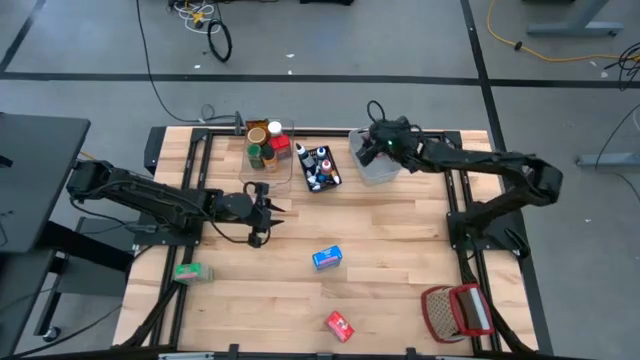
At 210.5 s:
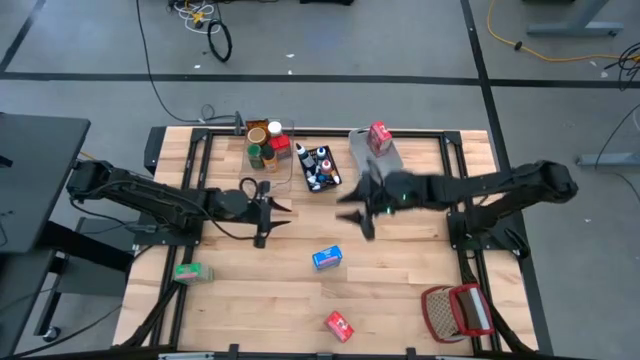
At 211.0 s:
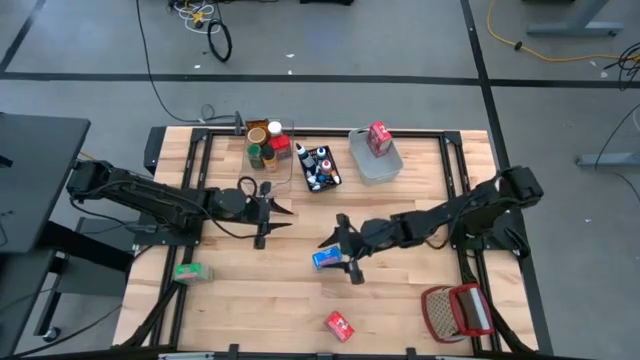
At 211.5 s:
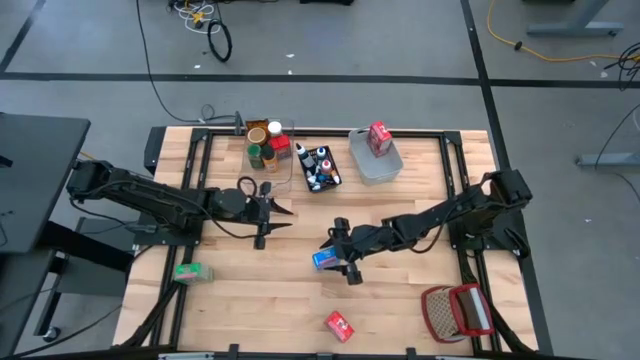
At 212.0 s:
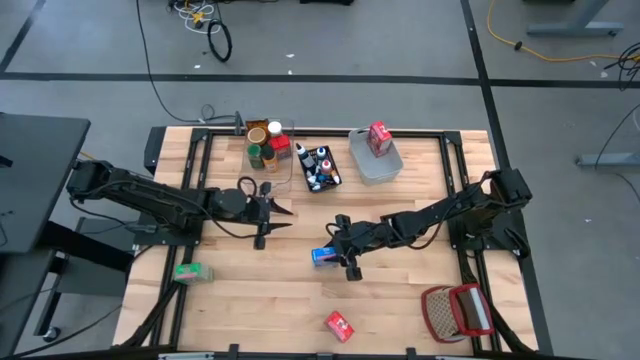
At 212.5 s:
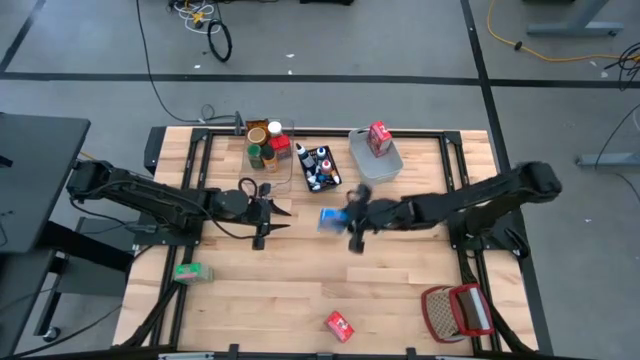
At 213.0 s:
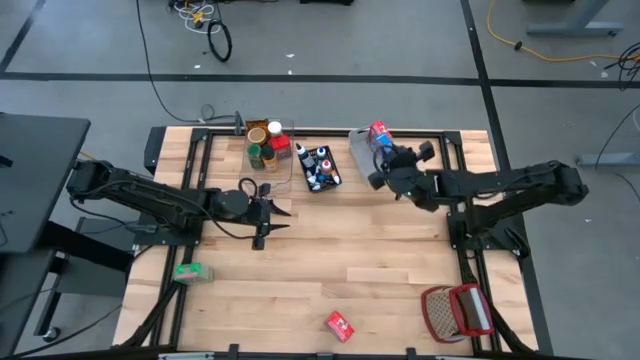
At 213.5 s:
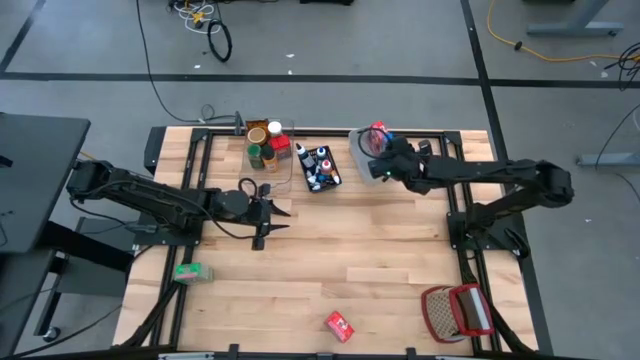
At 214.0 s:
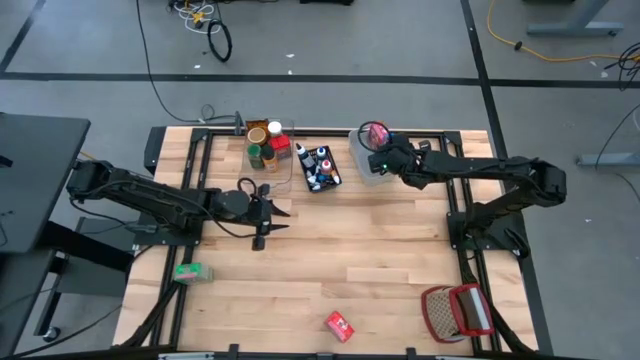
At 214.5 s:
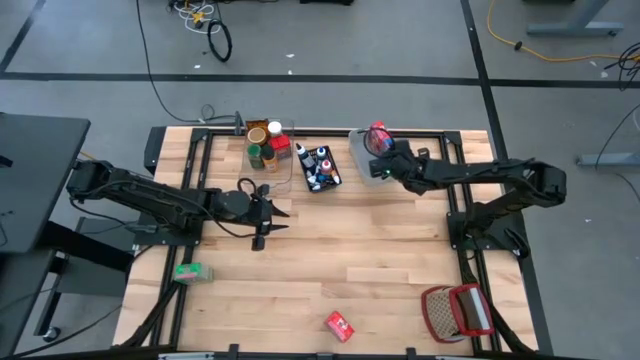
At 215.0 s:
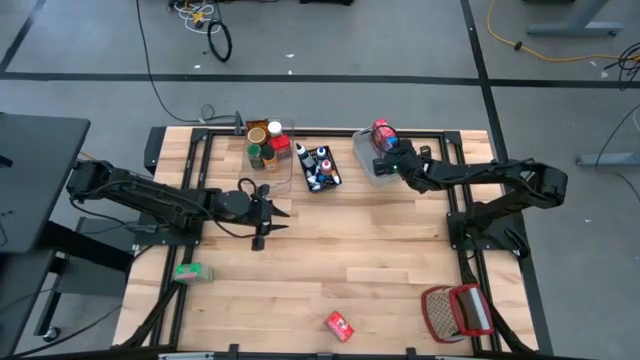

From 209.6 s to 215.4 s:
Task: Pick & Place Kitchen Items
Put the blue cereal box into the gray bin

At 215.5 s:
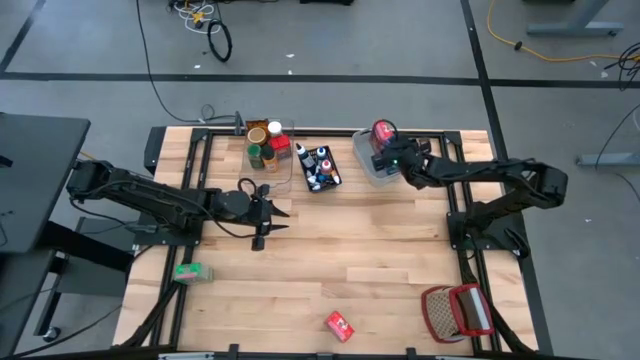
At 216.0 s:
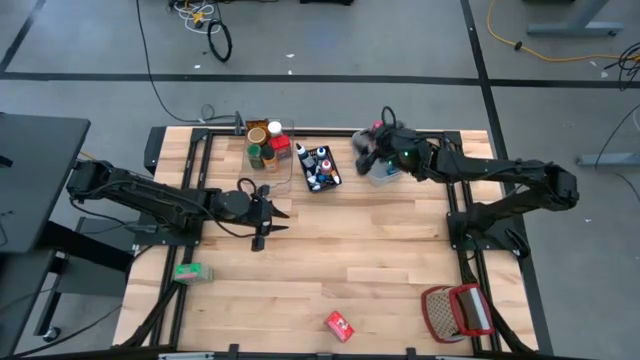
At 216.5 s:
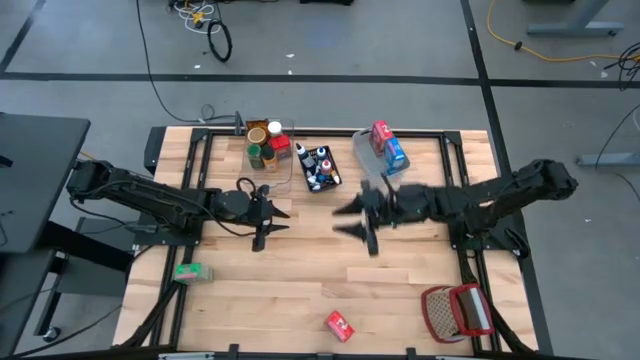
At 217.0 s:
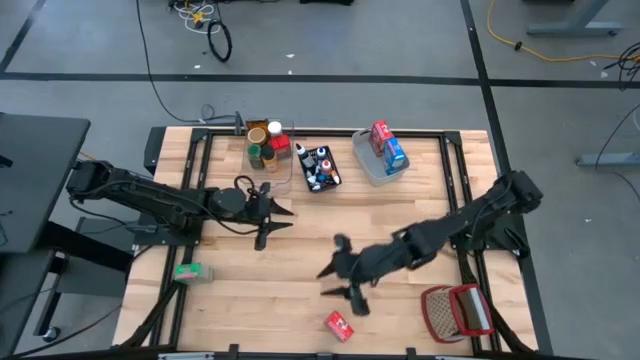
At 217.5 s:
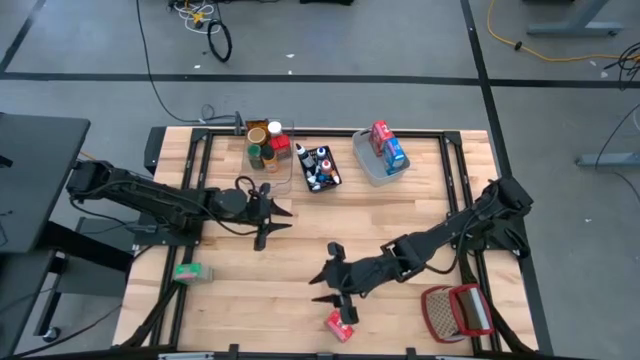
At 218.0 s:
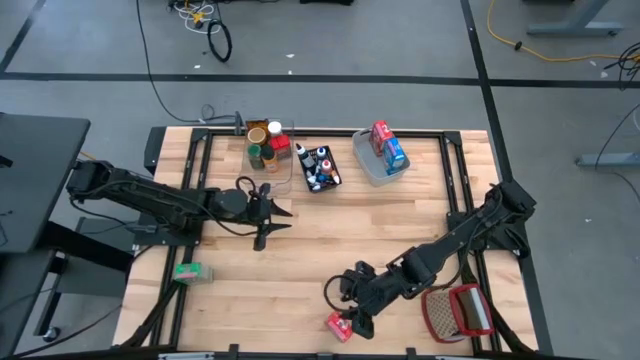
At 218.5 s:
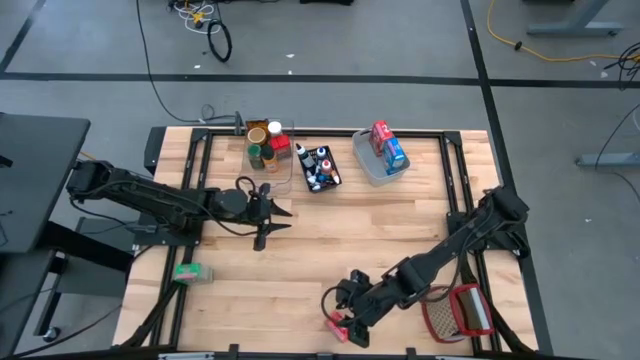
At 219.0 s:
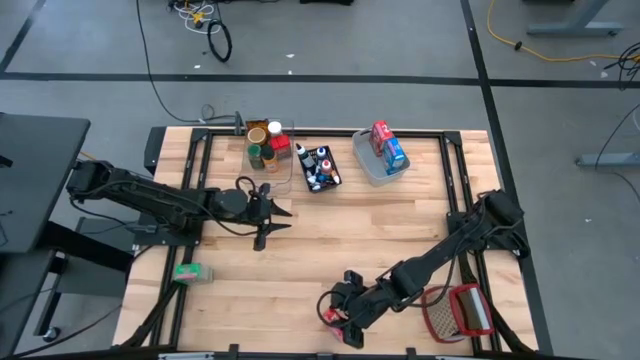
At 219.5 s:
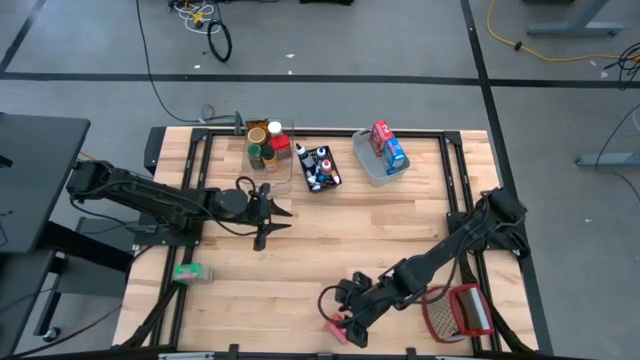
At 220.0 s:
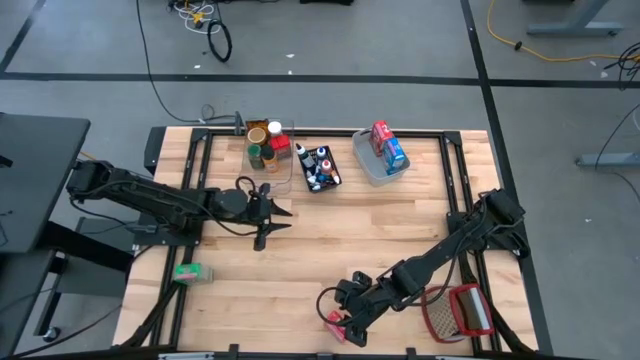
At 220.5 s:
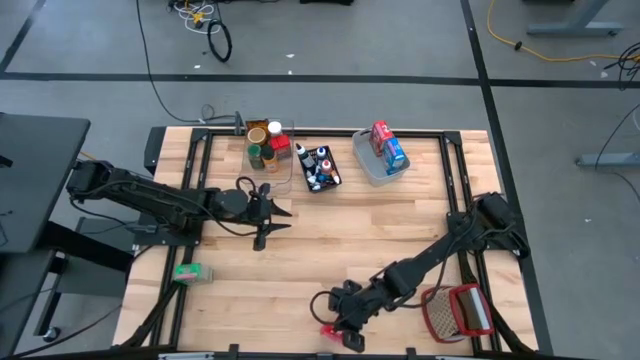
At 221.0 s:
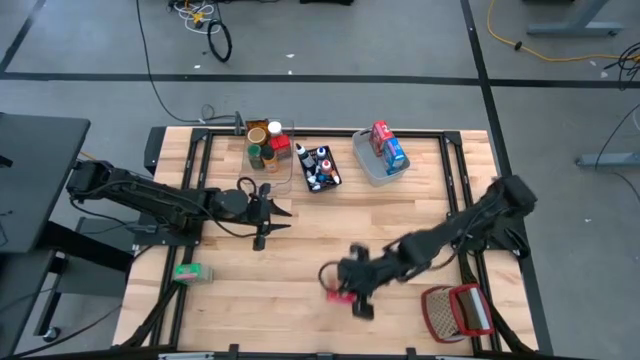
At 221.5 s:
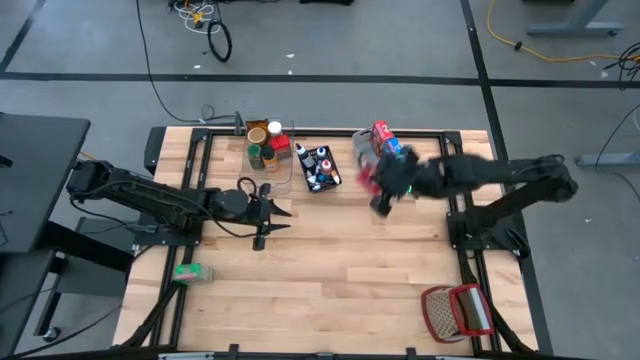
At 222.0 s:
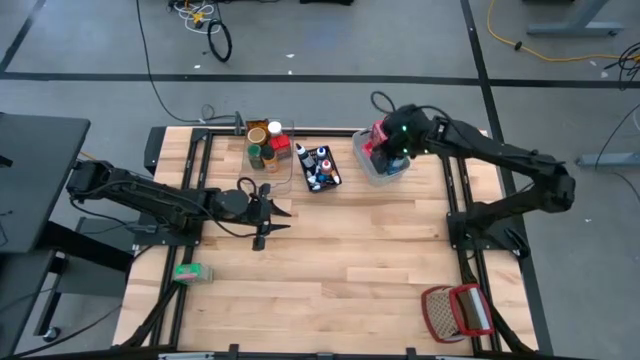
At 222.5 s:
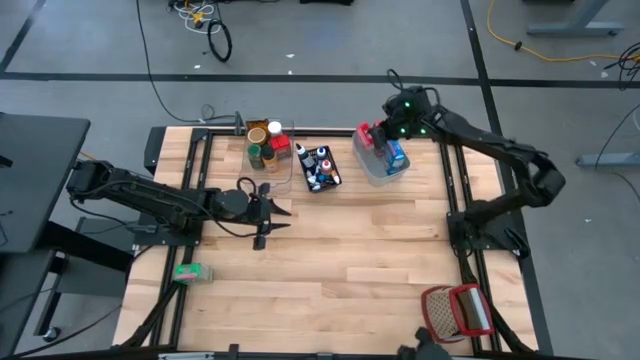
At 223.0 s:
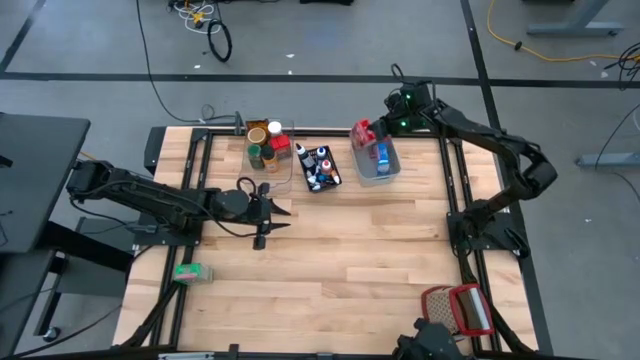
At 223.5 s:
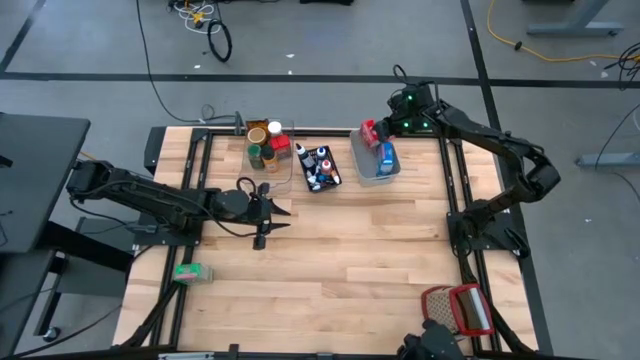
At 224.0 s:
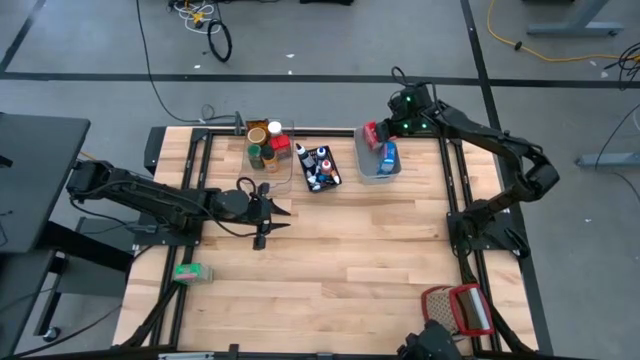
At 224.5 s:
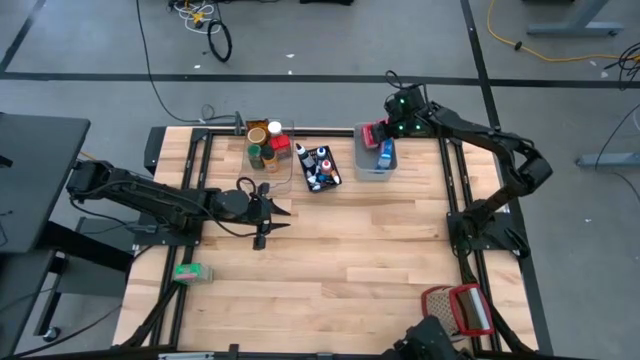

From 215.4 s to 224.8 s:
Put the red cereal box into the gray bin

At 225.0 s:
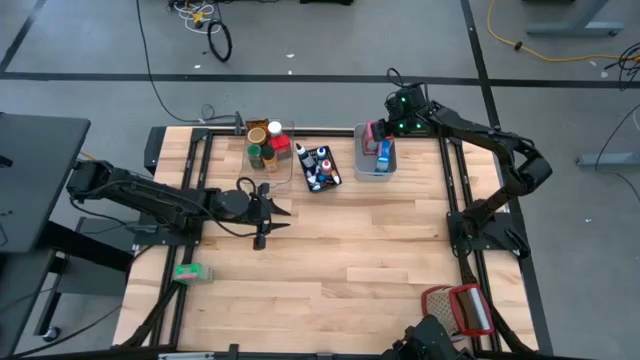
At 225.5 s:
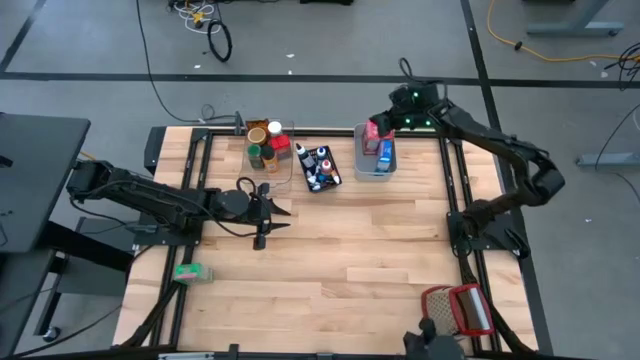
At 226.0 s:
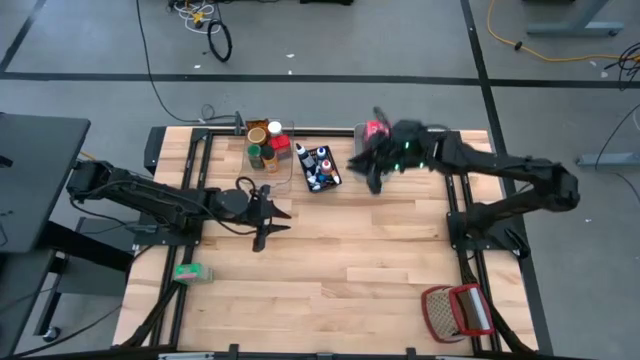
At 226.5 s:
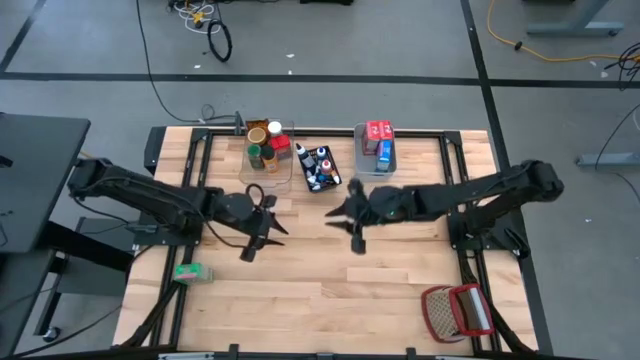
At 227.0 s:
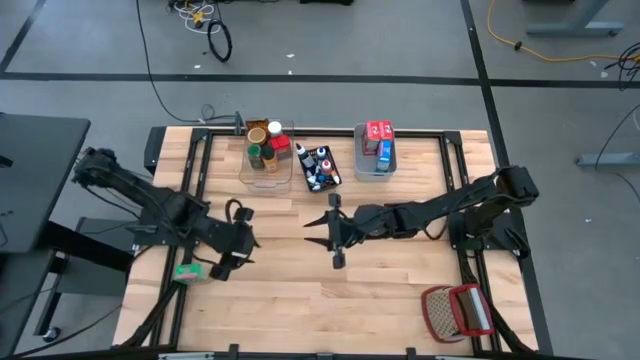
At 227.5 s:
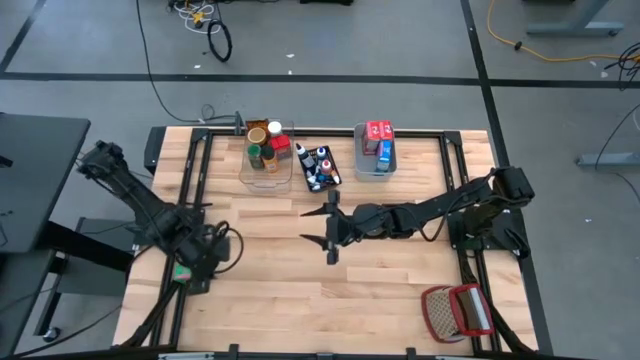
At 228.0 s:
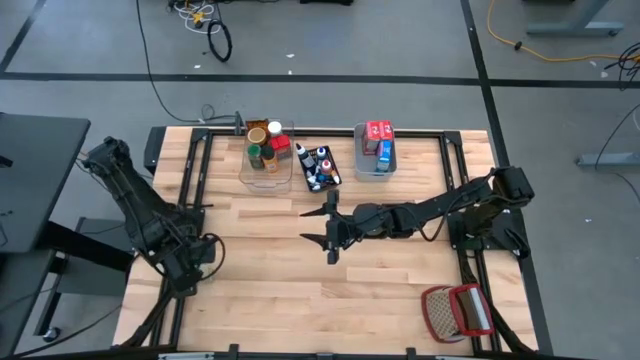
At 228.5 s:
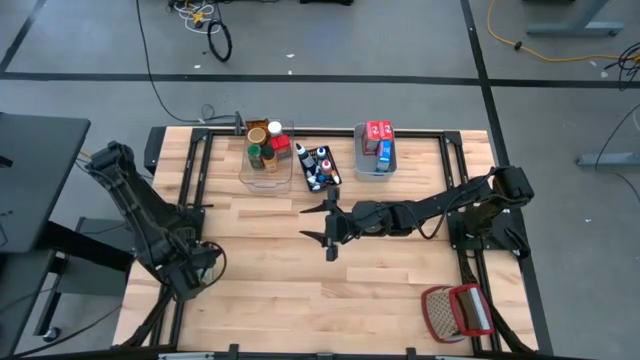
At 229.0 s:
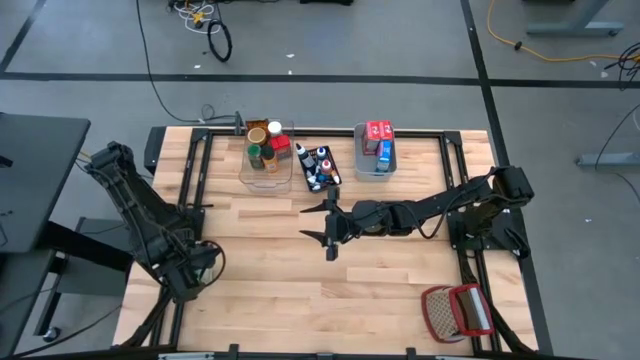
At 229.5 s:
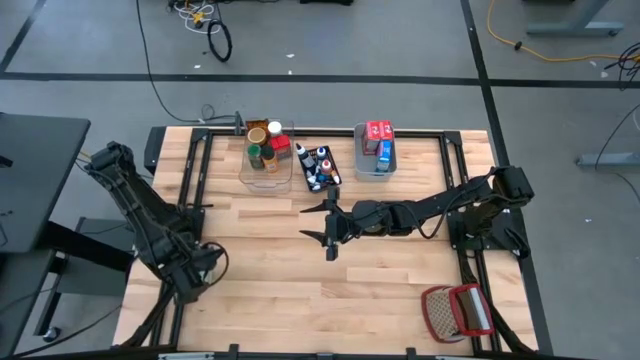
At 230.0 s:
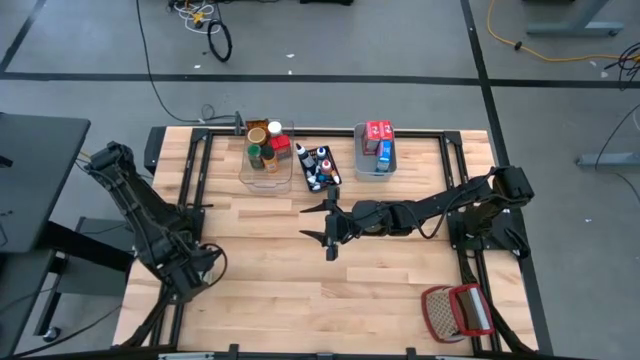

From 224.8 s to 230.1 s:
Put the green cereal box into the gray bin

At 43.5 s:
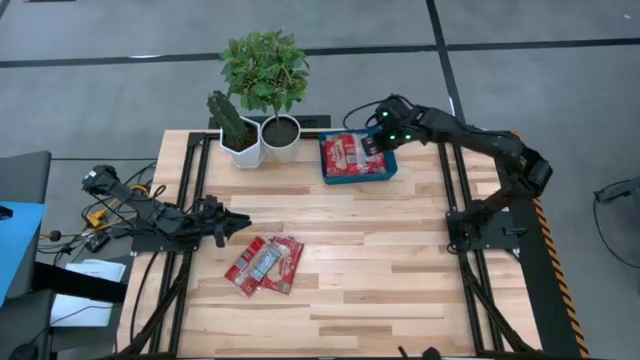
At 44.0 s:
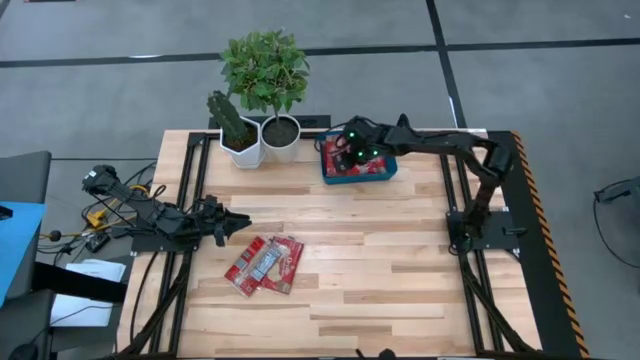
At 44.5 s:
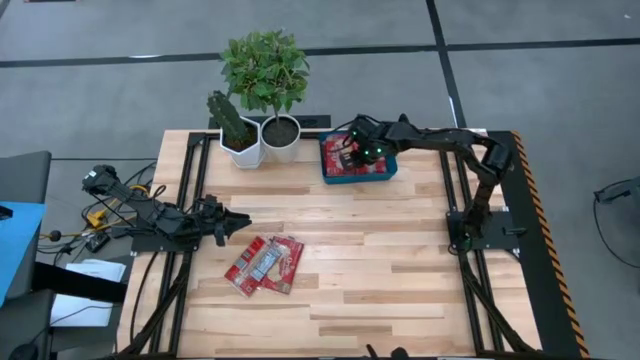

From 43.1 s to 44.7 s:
Task: Sort popcorn bags into baskets
Adjust the red popcorn bag into the blue container
